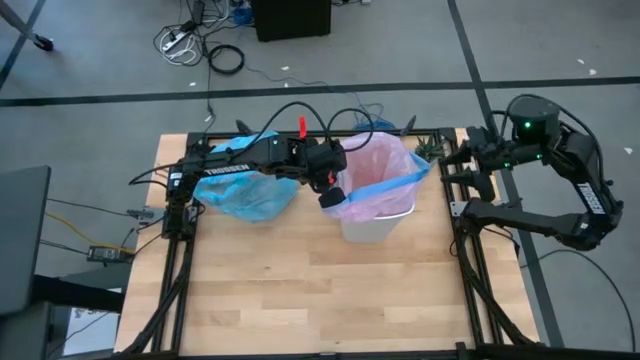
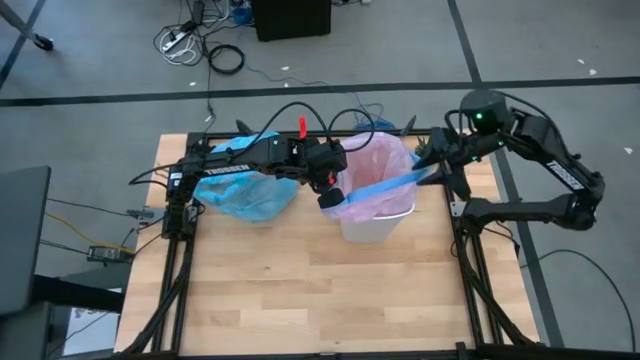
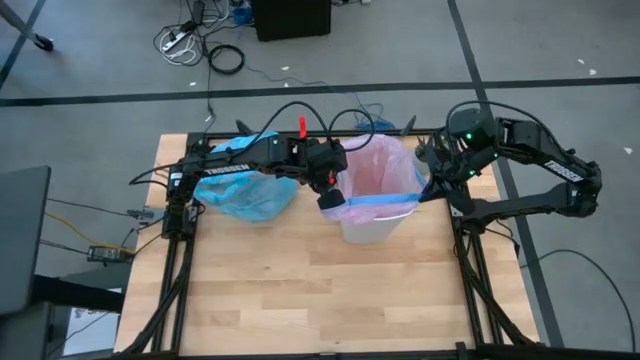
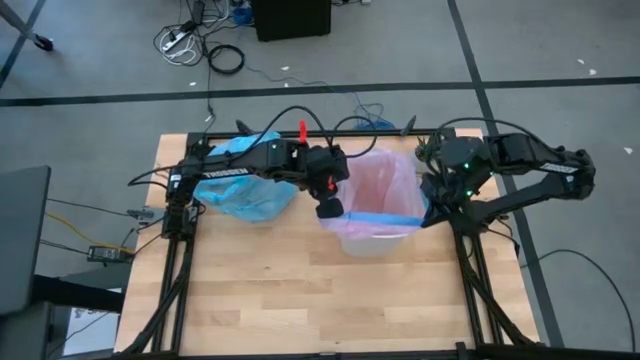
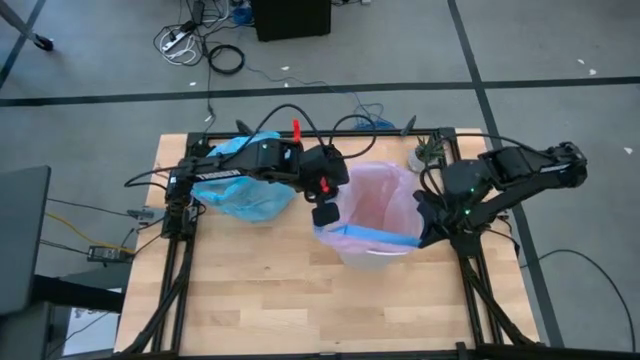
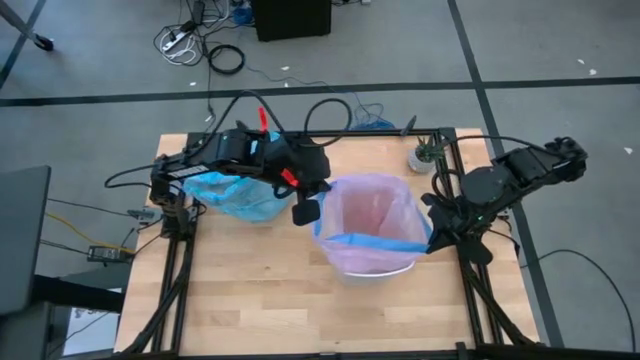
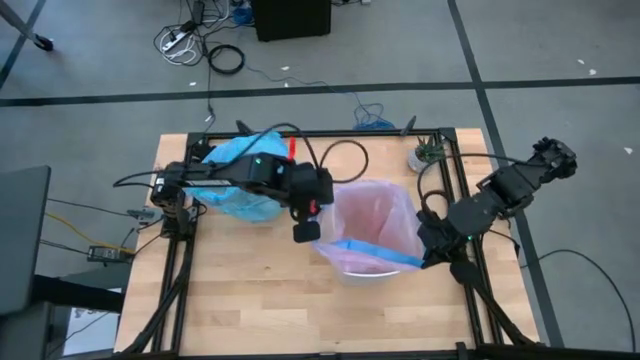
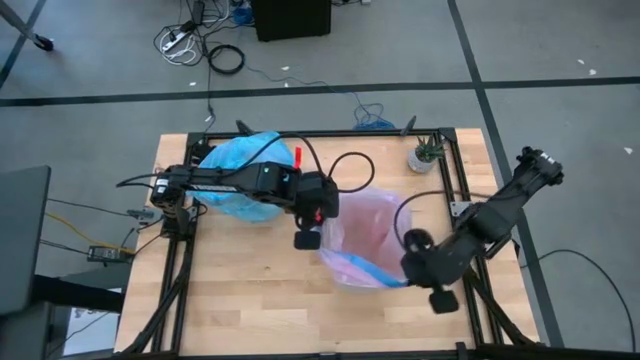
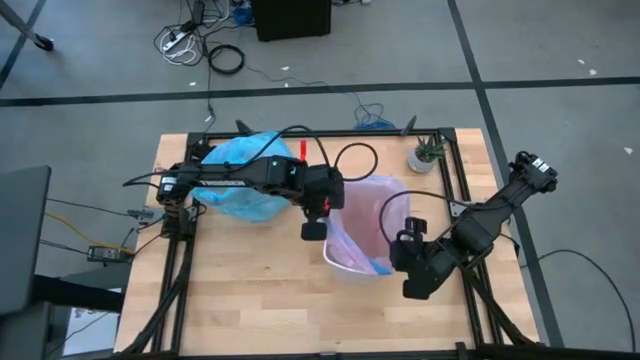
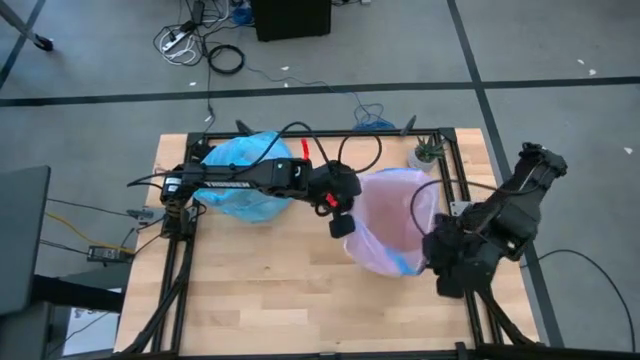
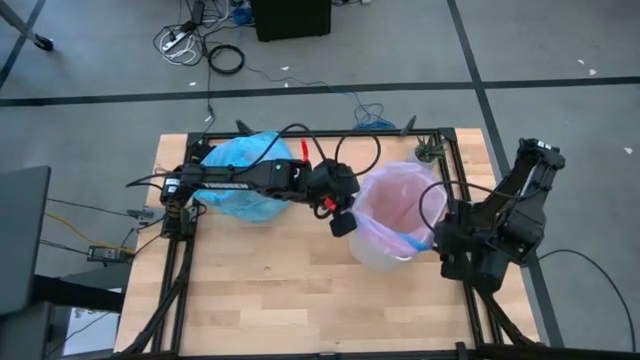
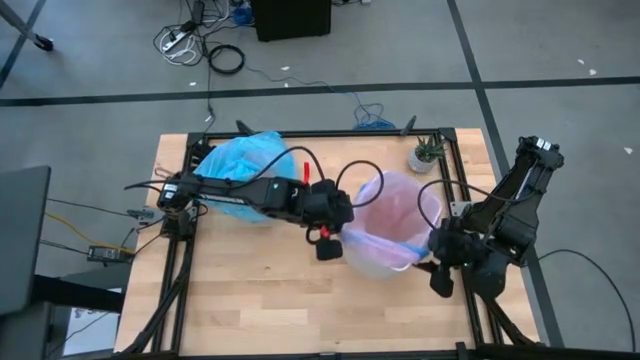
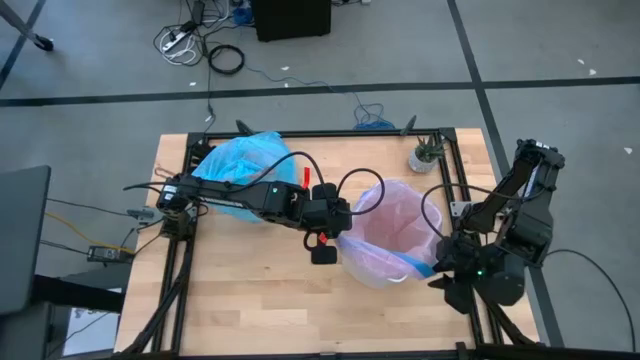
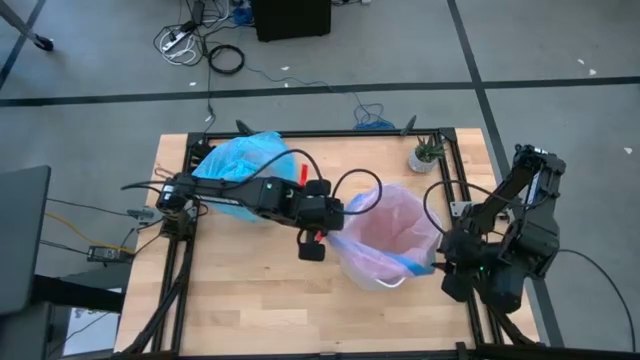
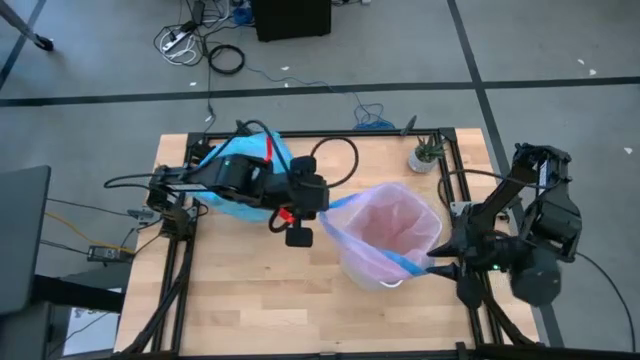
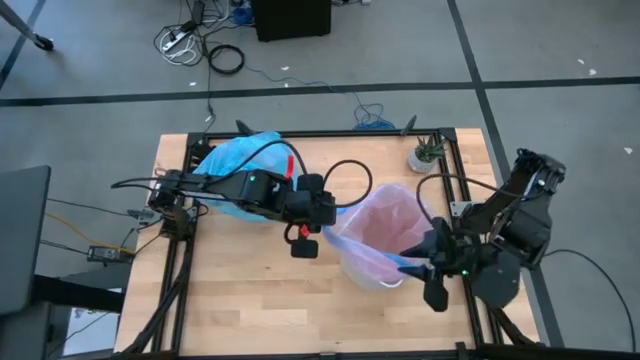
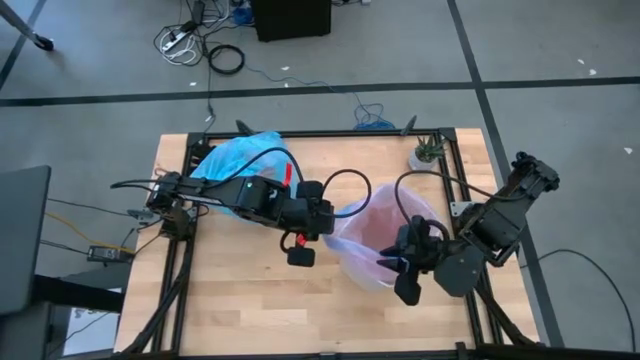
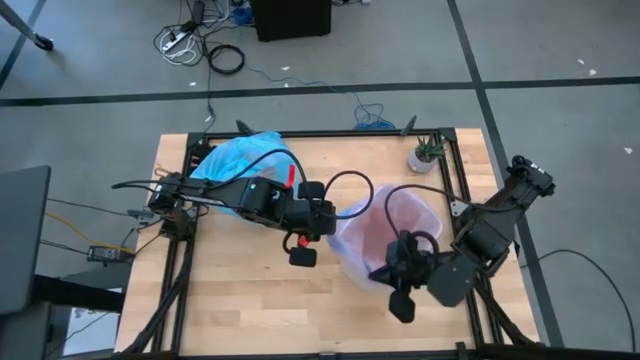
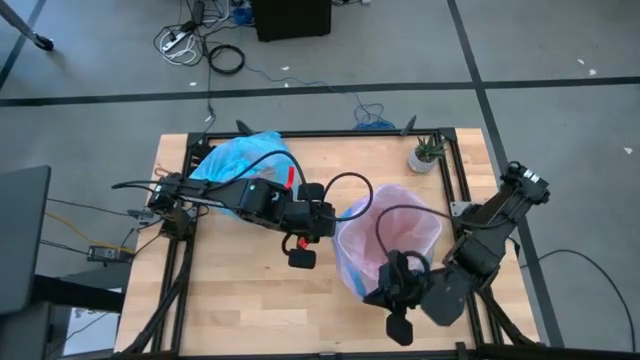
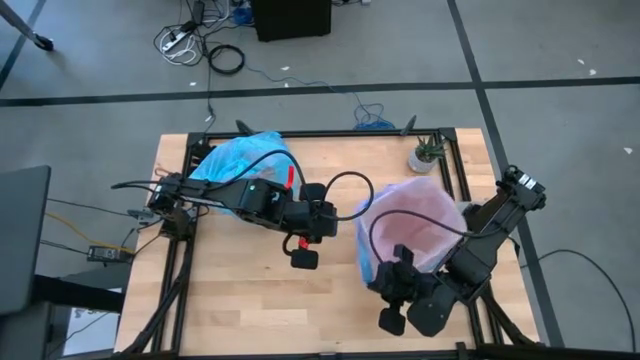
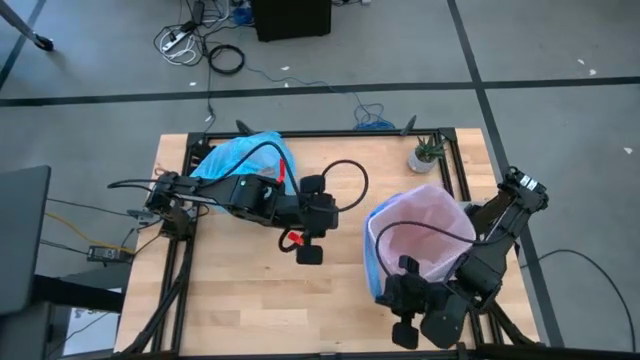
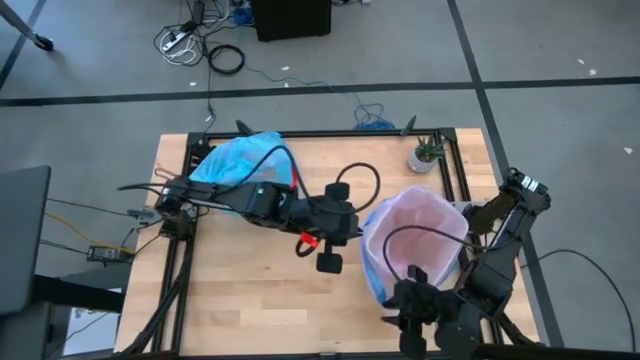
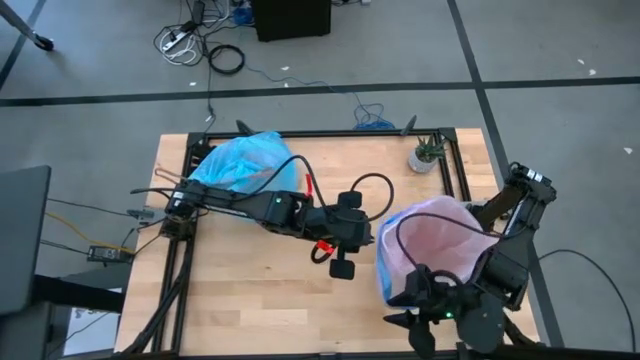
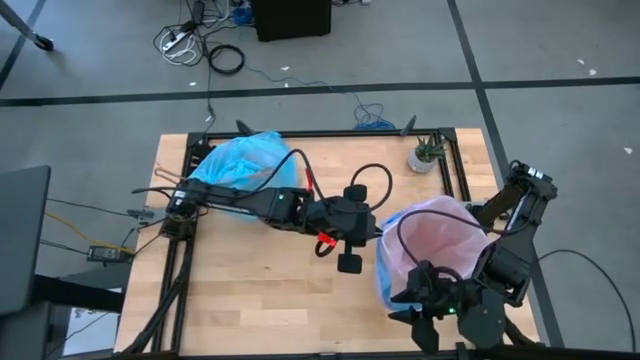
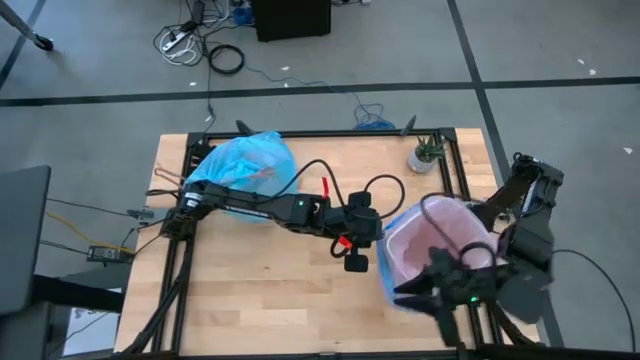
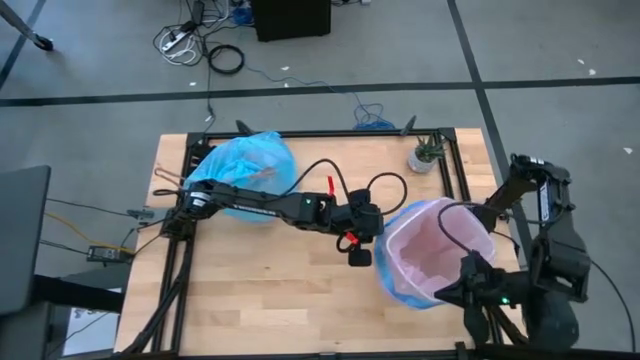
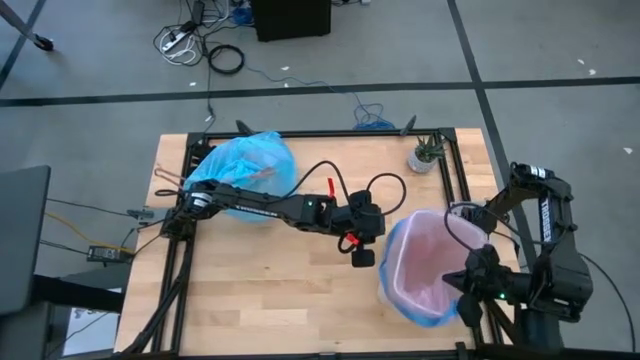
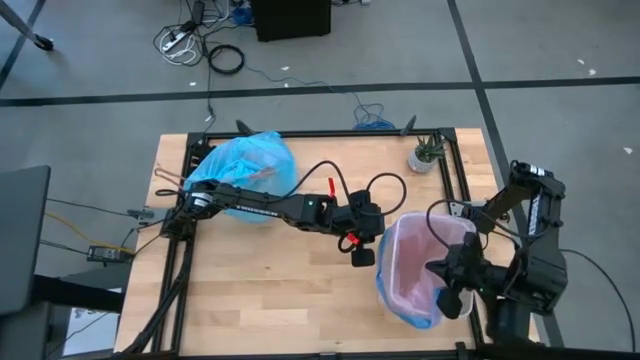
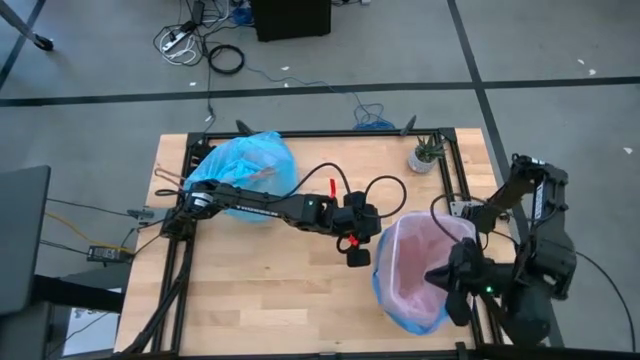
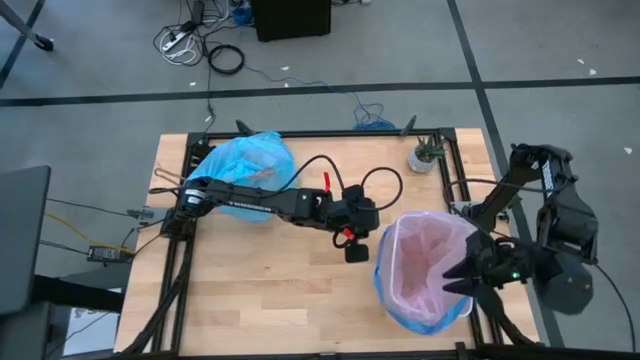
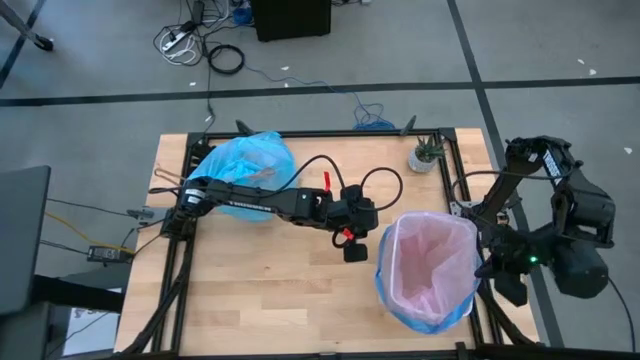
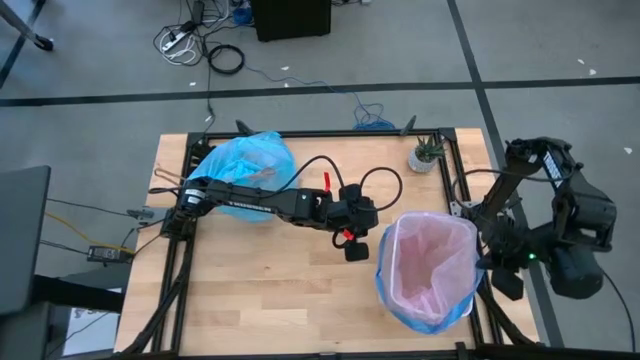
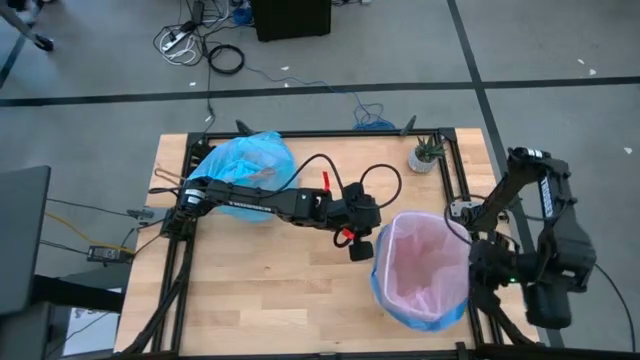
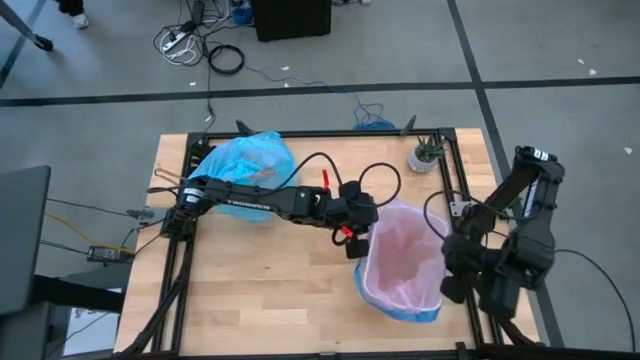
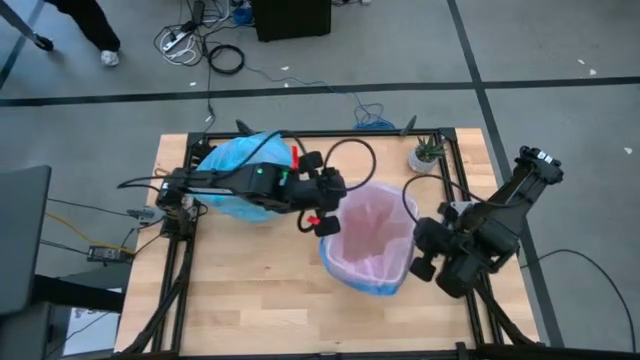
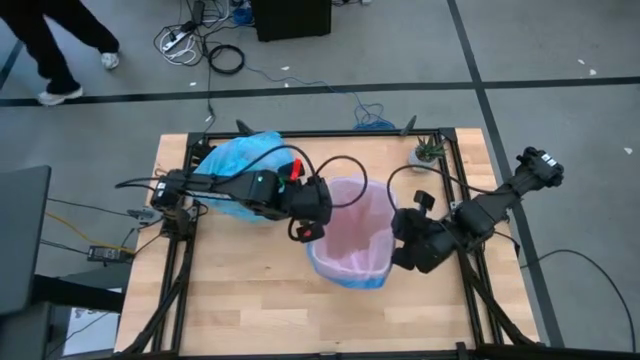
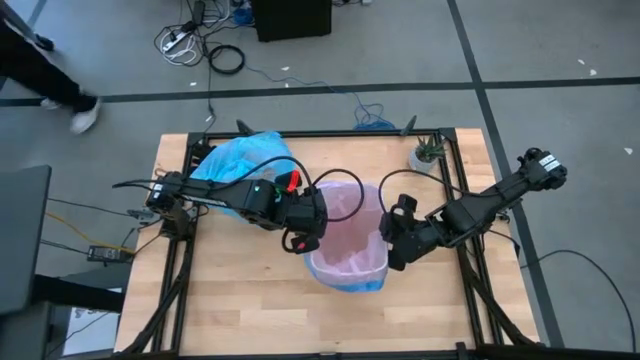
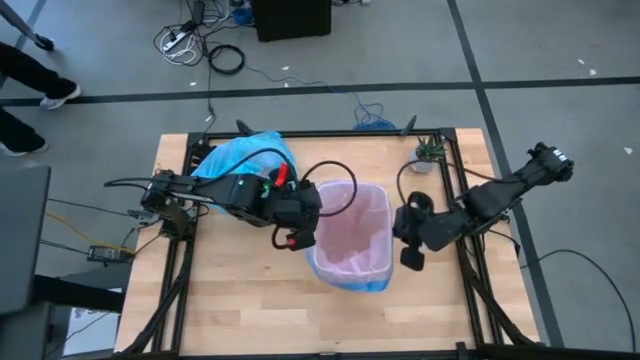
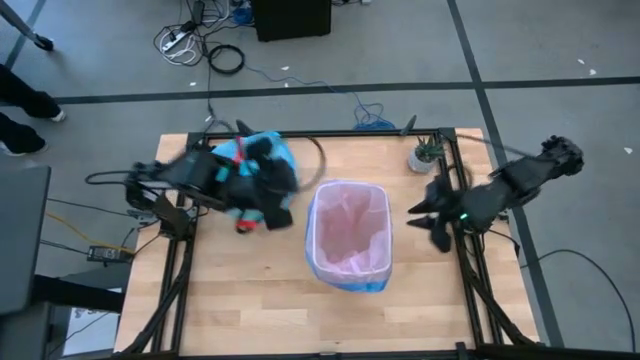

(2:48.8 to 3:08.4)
Task: place trash/remove bag and relplace
Put the new trash bag into the trash bin

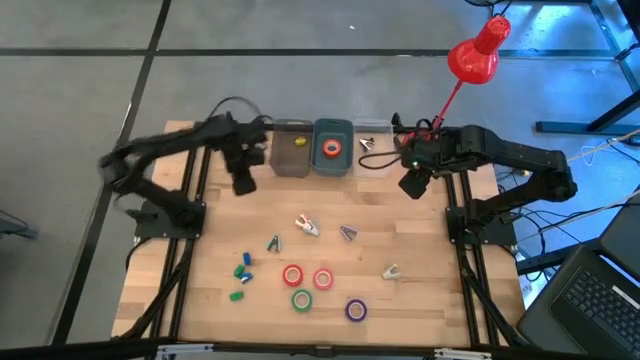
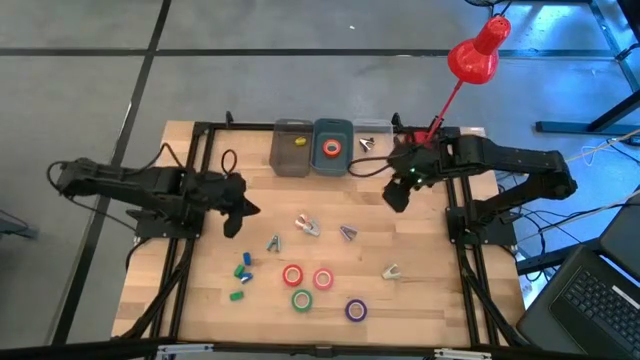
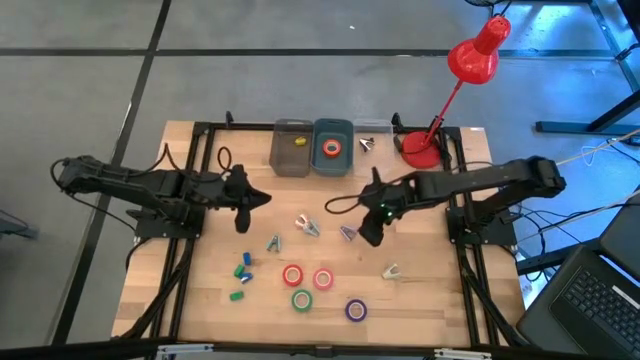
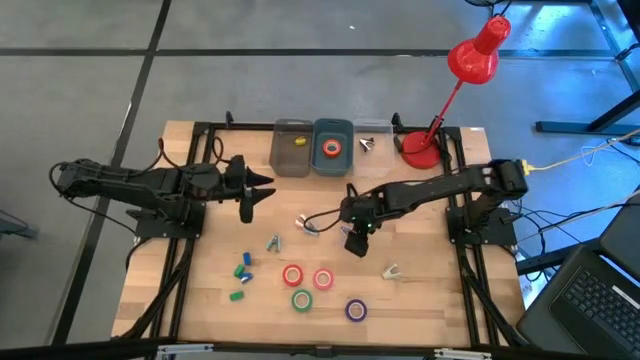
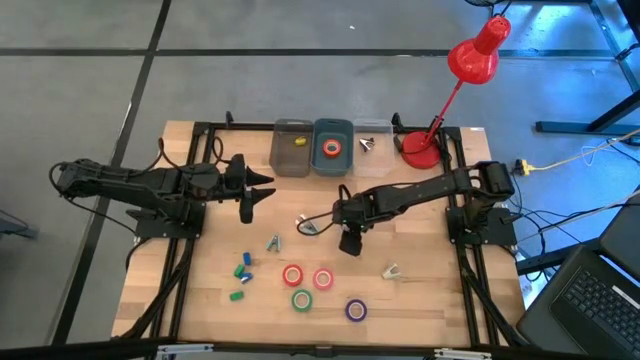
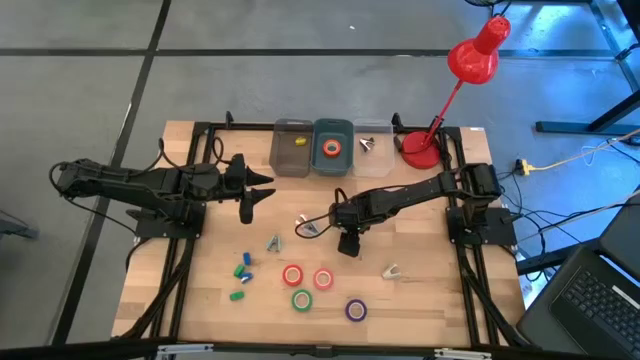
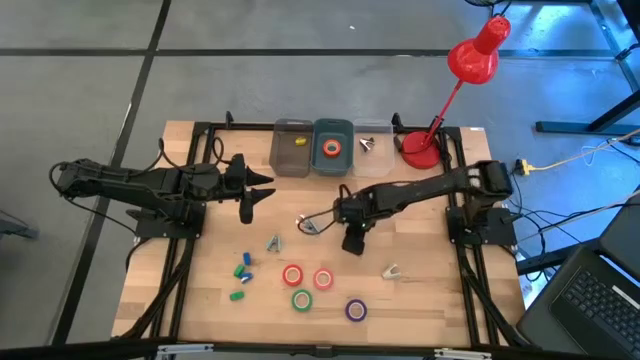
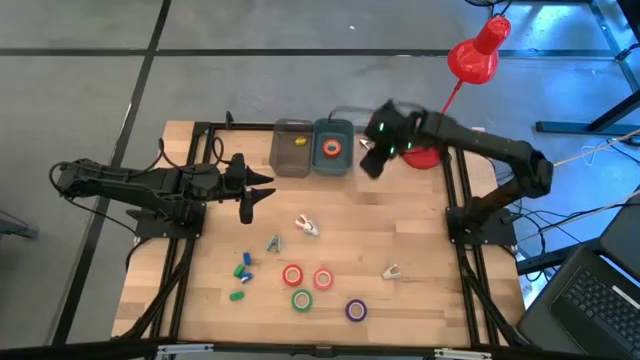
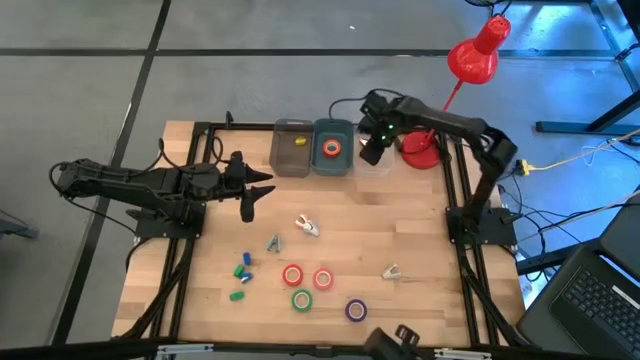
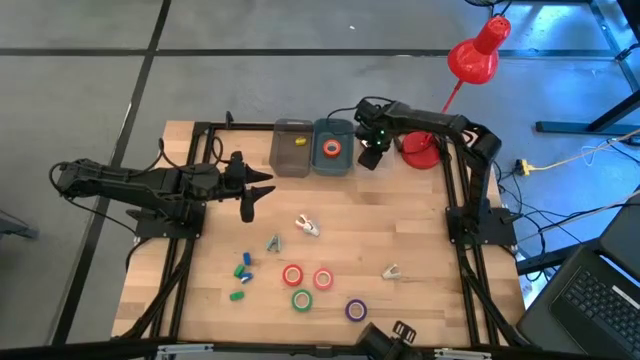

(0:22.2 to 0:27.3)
Task: Pick and place Stapler, Stapler remover, tape
Put the purple staple remover into the transparent bin
